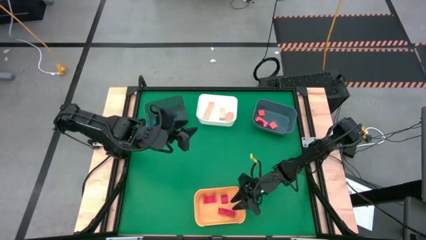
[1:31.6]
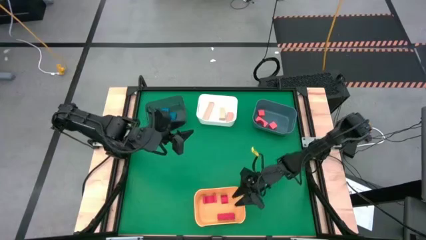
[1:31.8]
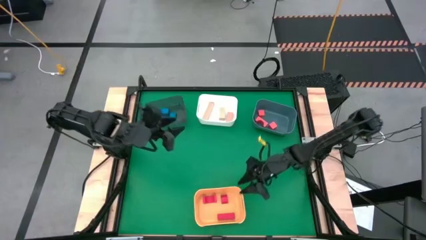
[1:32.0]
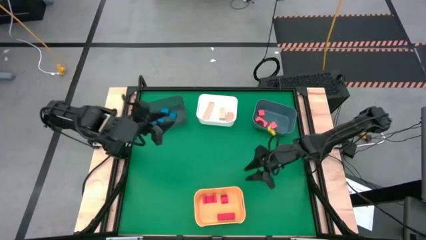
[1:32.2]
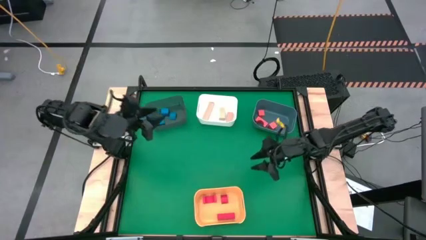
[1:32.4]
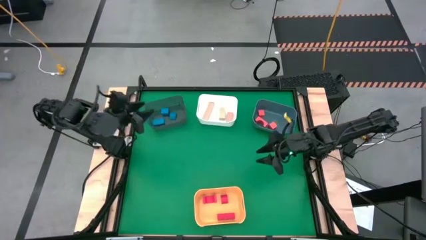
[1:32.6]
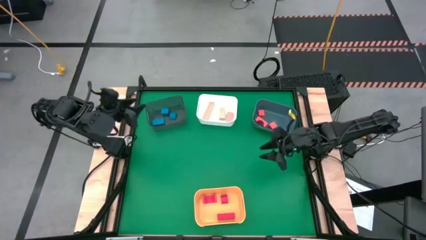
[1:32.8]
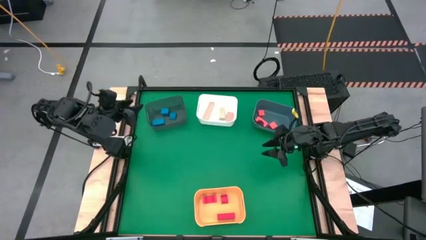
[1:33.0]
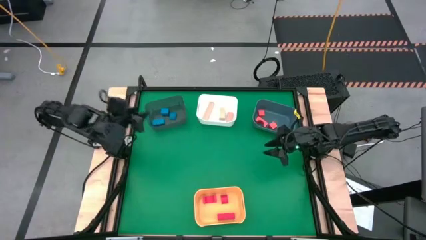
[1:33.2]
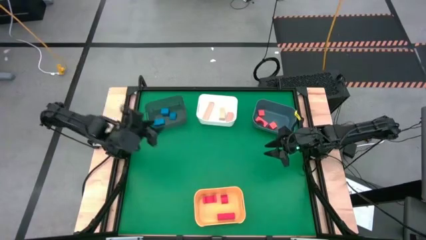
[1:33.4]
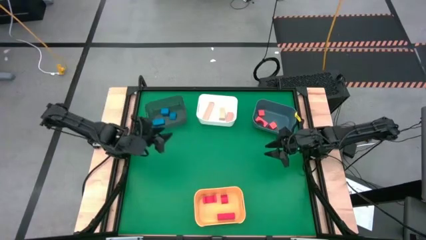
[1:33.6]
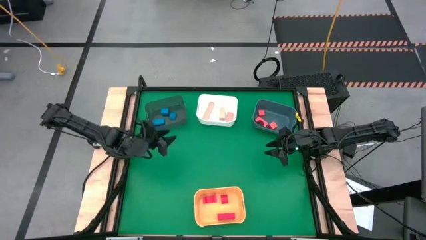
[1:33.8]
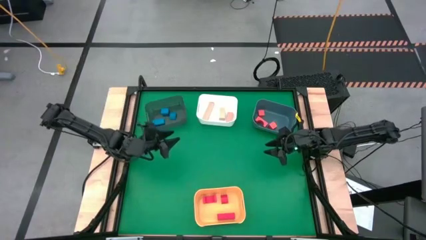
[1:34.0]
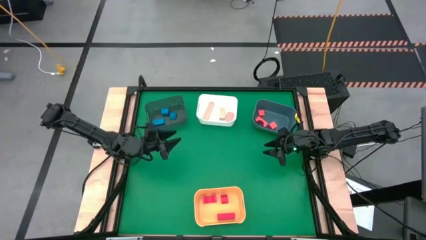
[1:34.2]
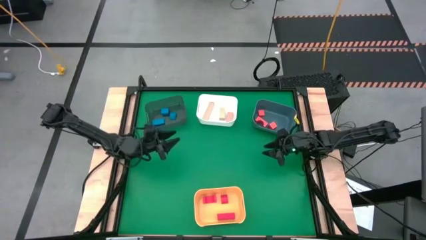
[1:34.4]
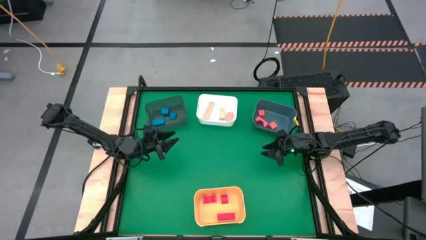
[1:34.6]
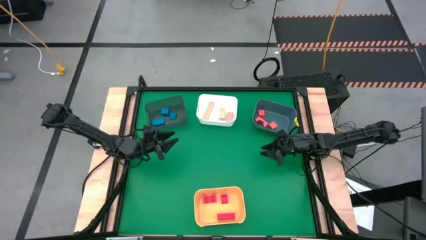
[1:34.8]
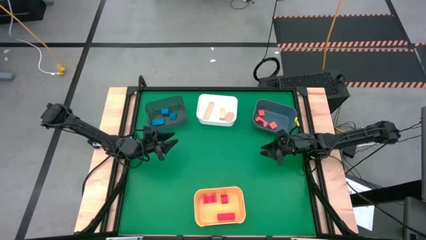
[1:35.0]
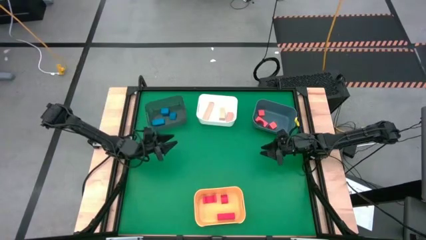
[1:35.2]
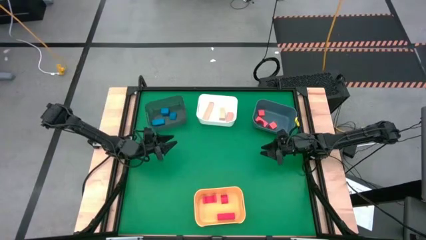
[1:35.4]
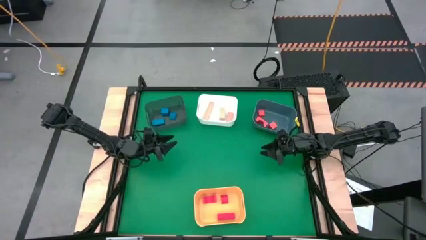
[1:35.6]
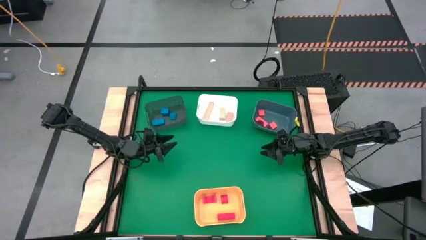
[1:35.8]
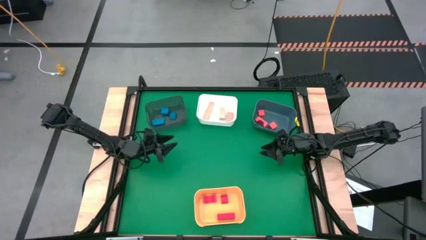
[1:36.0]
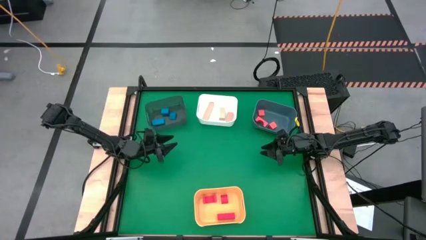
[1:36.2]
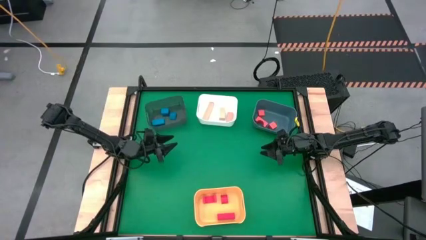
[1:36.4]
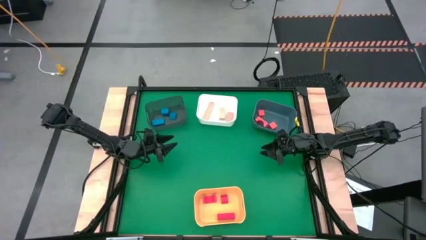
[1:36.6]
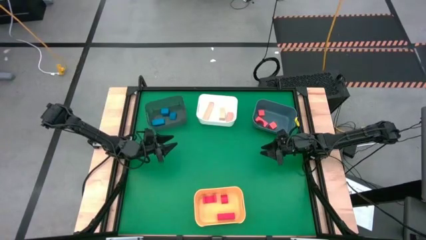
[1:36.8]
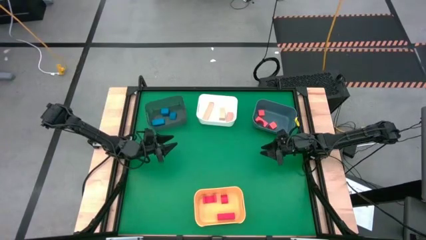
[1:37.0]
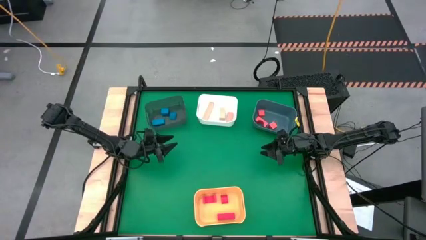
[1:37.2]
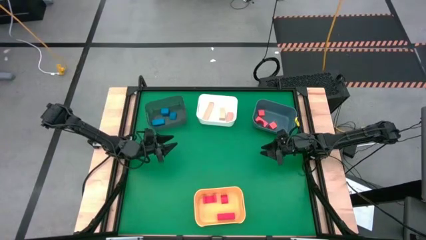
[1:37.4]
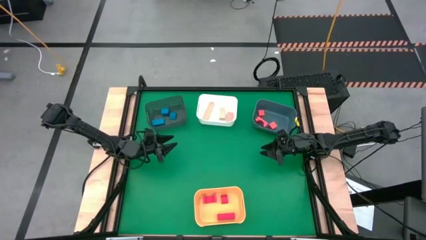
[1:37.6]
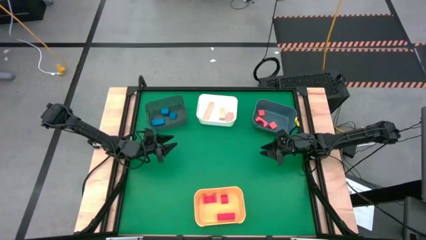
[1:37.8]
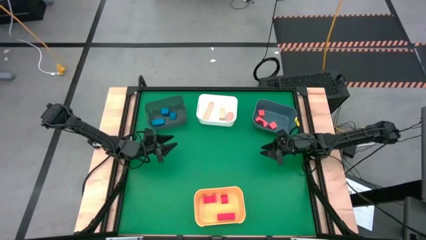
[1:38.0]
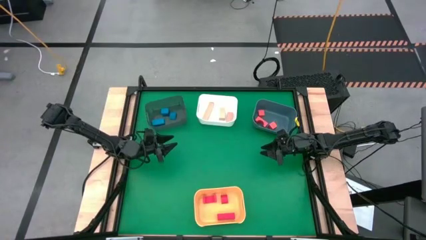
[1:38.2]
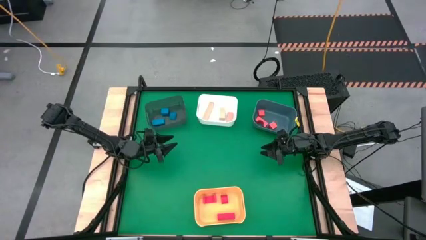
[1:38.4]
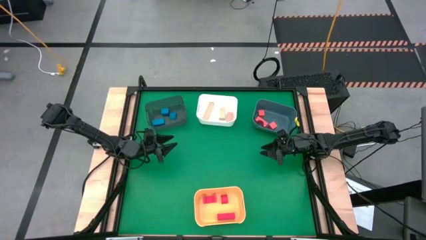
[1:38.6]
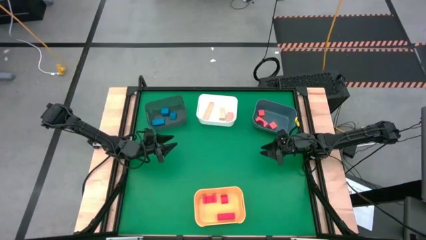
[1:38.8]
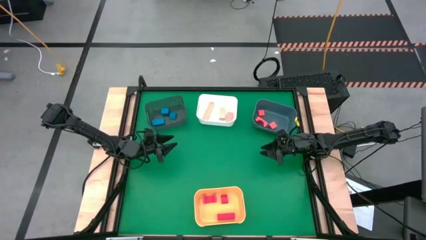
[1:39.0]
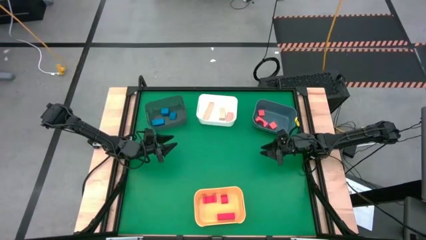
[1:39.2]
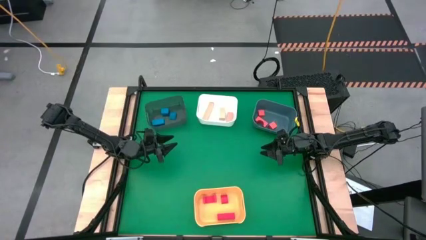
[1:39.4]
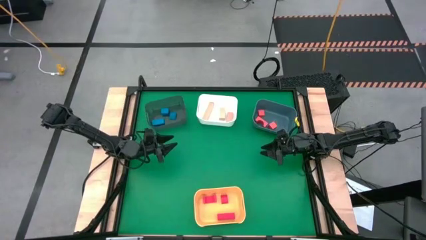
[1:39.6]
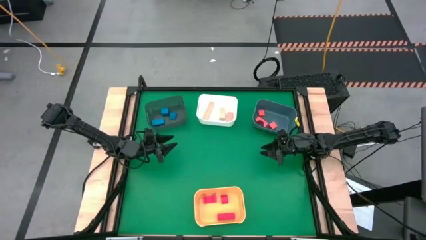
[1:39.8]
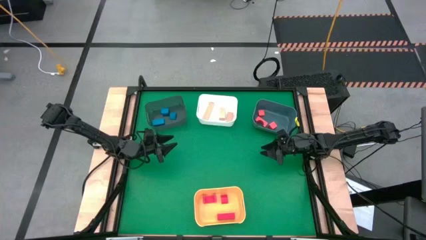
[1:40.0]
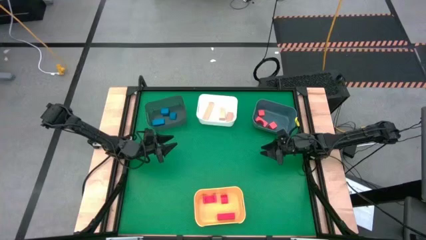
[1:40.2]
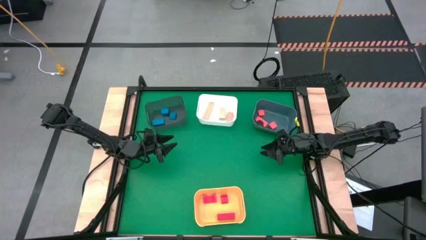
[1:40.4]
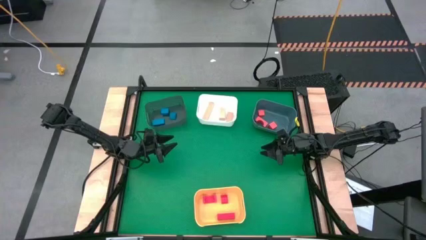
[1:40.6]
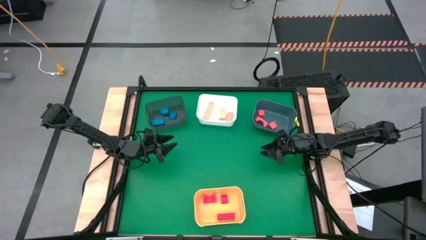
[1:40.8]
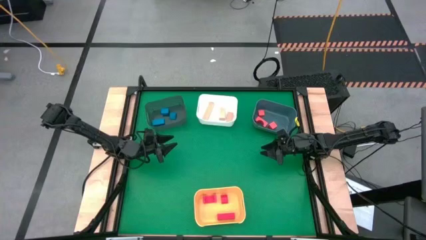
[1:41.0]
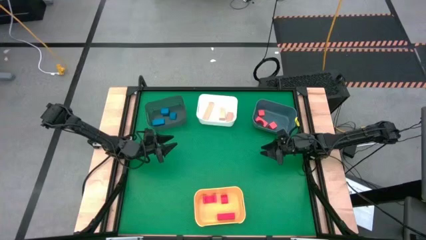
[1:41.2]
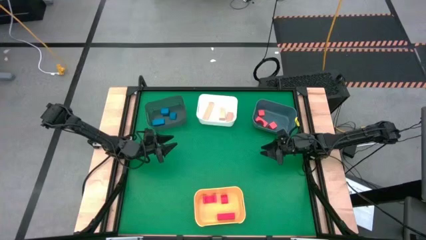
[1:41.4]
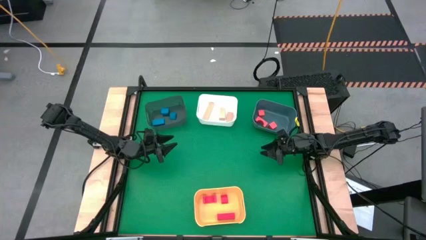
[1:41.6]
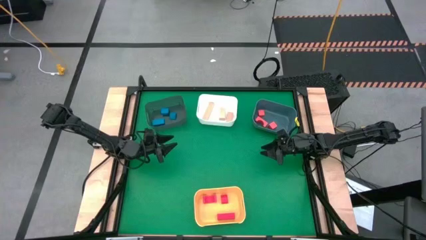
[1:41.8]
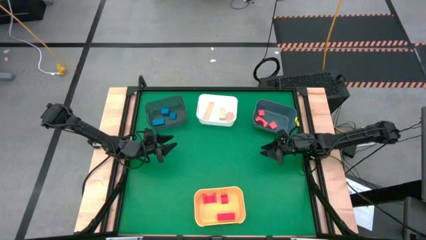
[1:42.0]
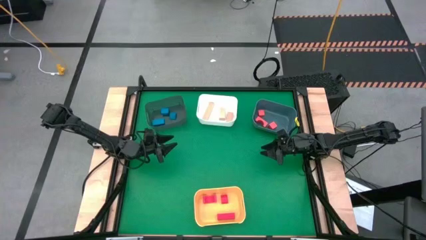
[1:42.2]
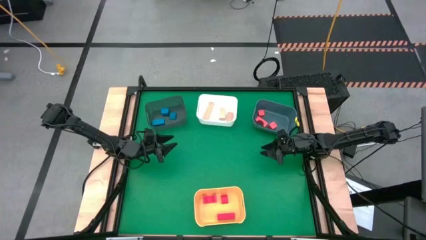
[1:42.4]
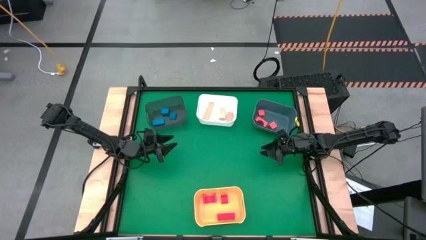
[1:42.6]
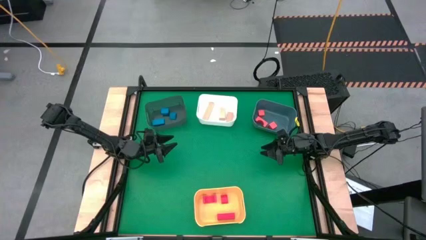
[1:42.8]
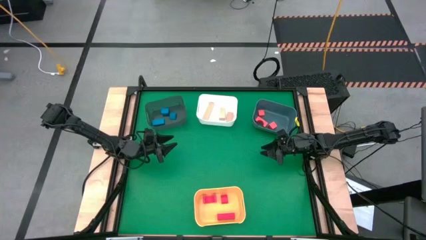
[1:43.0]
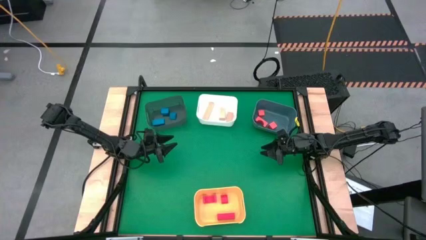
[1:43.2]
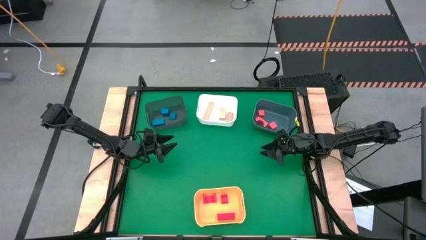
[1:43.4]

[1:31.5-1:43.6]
Task: Sort & place blocks by color
Return to Home Position
